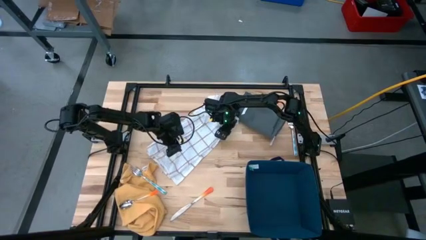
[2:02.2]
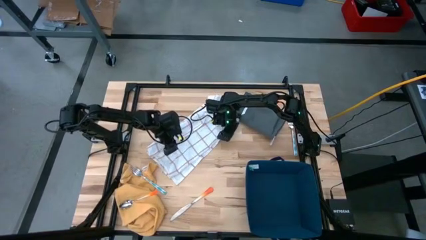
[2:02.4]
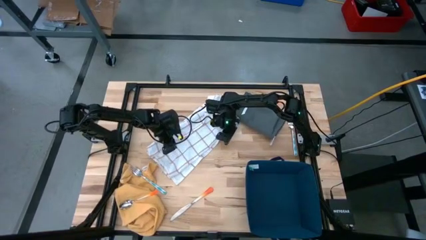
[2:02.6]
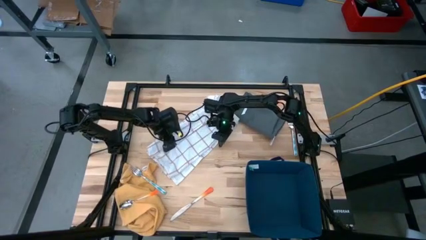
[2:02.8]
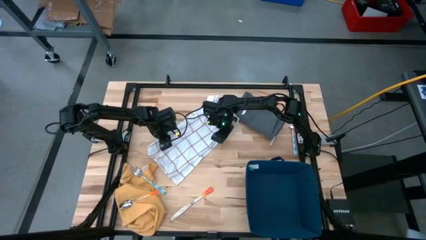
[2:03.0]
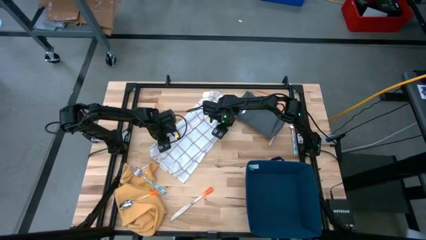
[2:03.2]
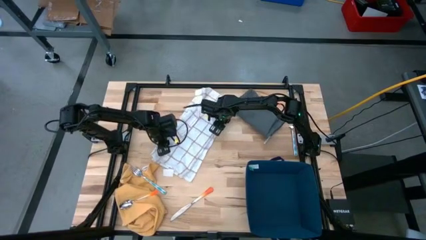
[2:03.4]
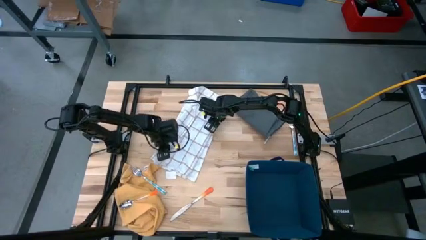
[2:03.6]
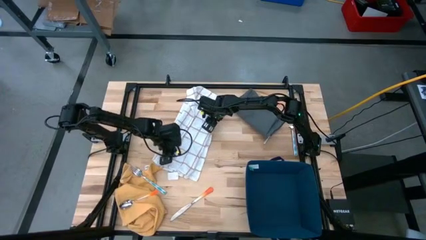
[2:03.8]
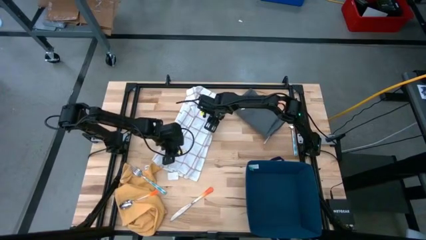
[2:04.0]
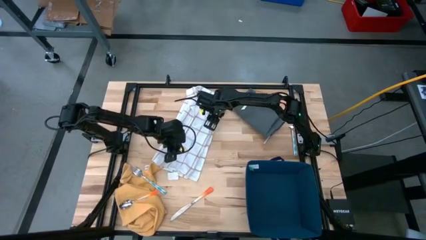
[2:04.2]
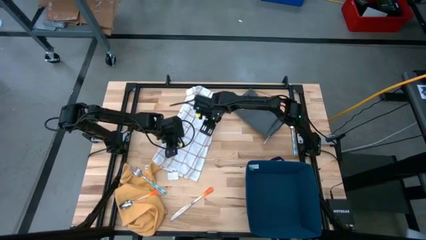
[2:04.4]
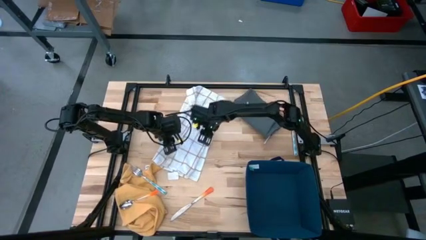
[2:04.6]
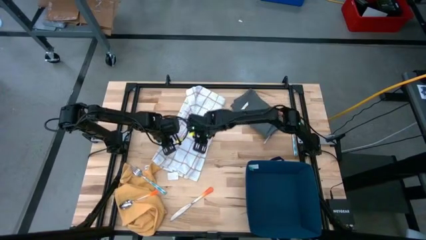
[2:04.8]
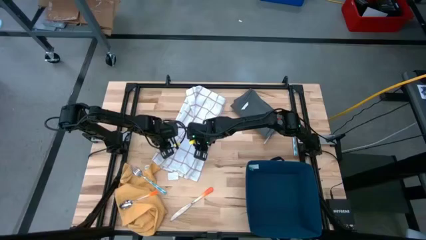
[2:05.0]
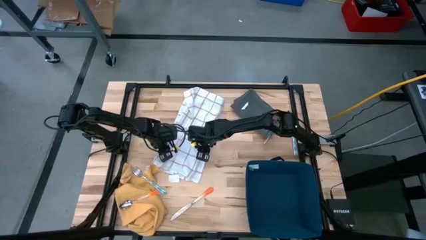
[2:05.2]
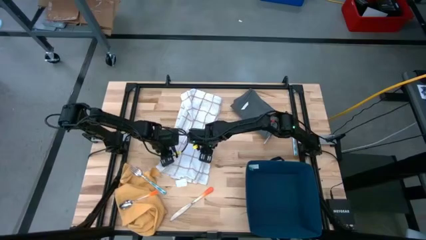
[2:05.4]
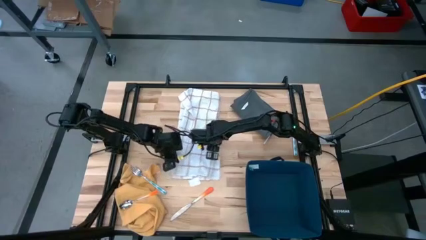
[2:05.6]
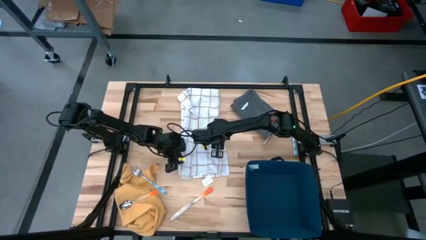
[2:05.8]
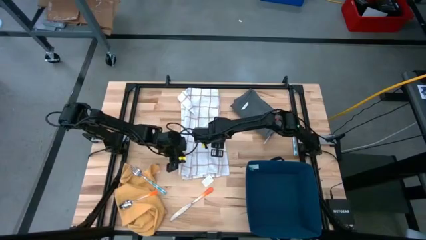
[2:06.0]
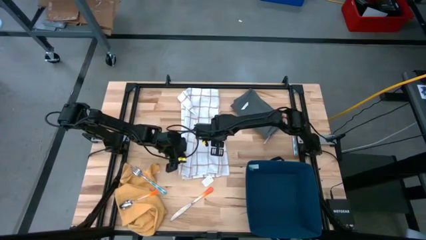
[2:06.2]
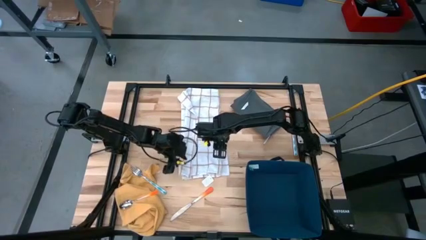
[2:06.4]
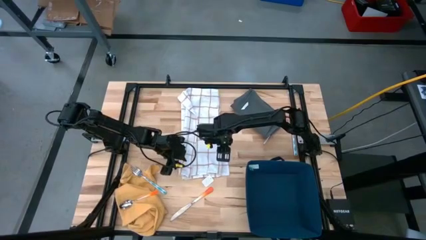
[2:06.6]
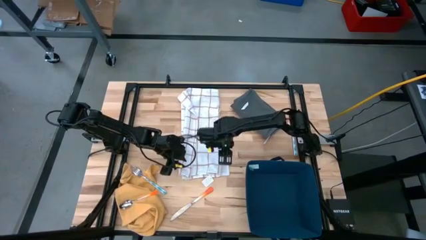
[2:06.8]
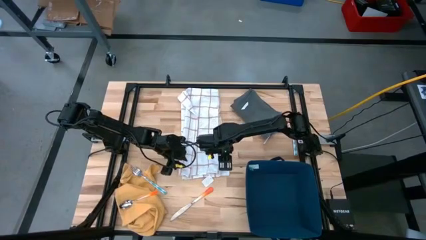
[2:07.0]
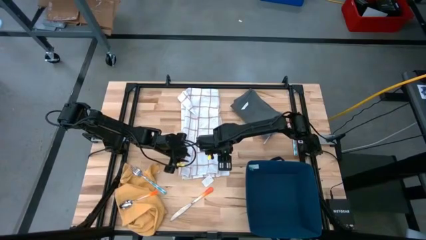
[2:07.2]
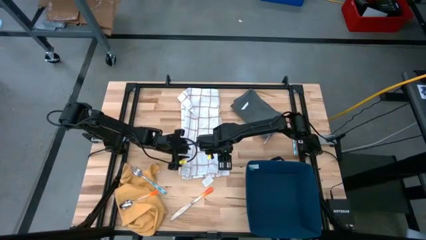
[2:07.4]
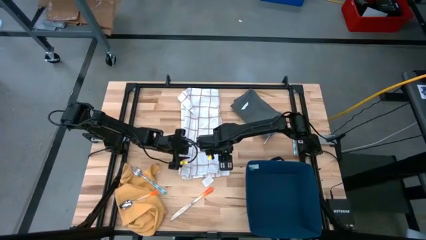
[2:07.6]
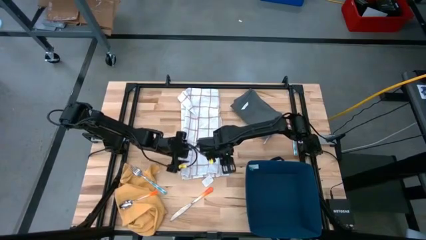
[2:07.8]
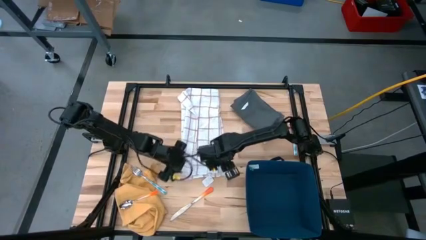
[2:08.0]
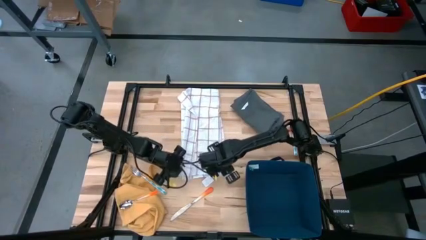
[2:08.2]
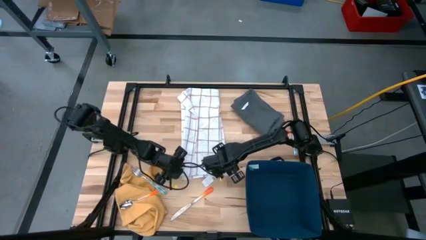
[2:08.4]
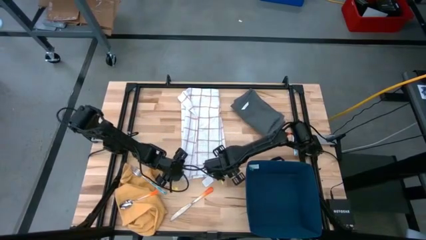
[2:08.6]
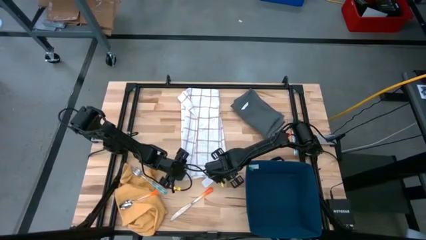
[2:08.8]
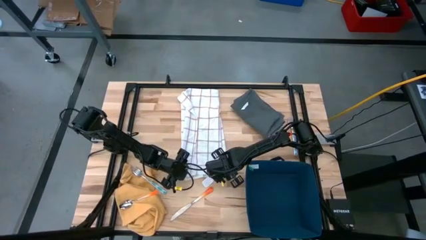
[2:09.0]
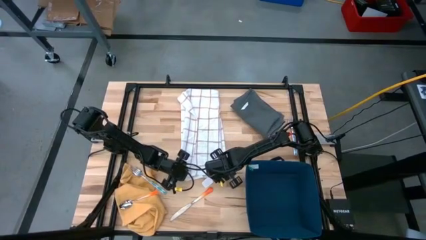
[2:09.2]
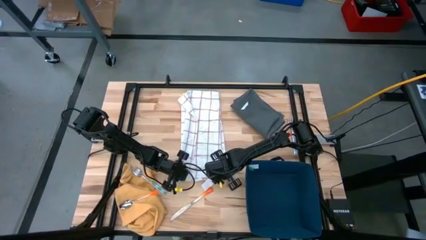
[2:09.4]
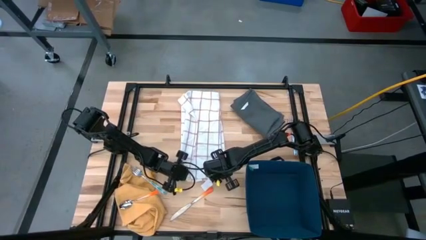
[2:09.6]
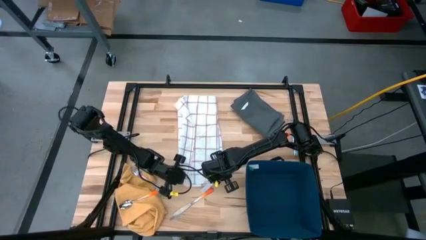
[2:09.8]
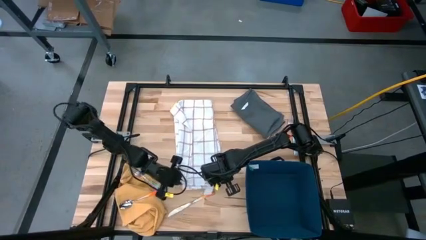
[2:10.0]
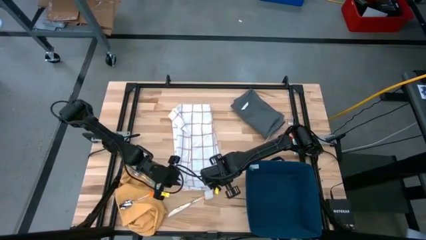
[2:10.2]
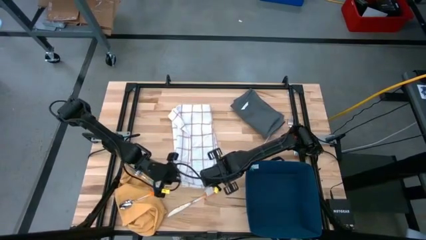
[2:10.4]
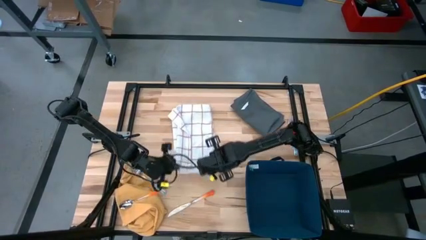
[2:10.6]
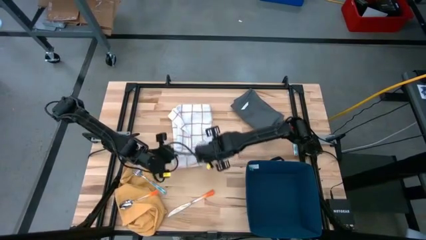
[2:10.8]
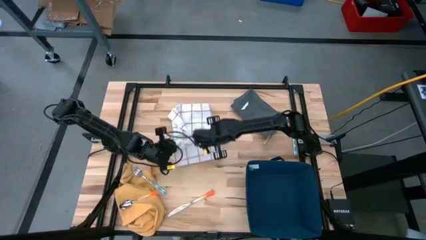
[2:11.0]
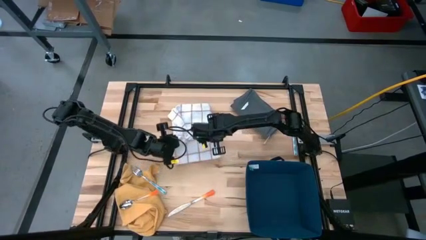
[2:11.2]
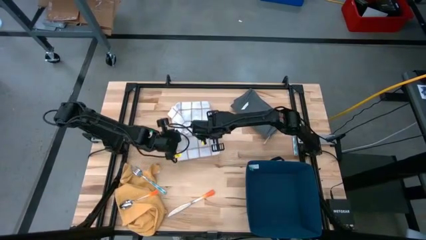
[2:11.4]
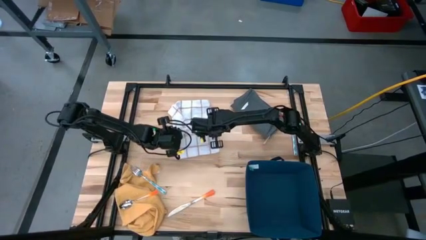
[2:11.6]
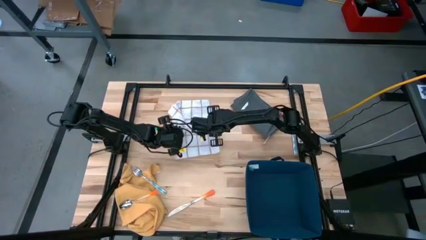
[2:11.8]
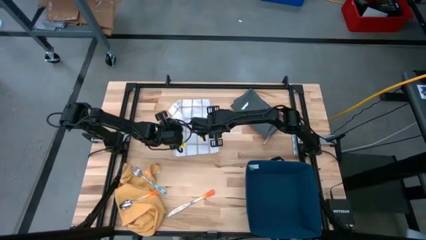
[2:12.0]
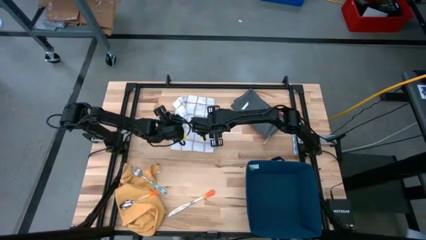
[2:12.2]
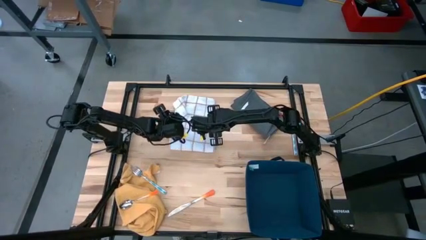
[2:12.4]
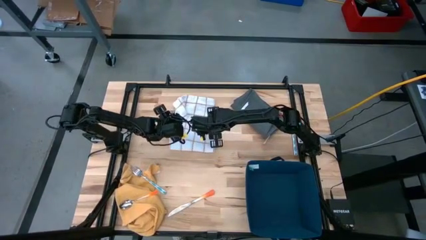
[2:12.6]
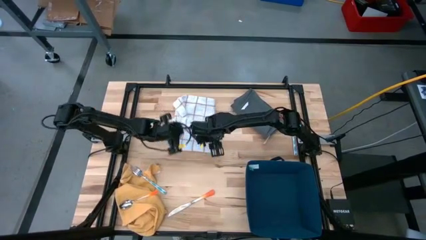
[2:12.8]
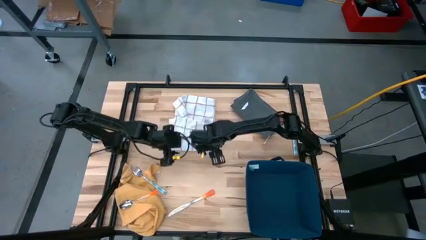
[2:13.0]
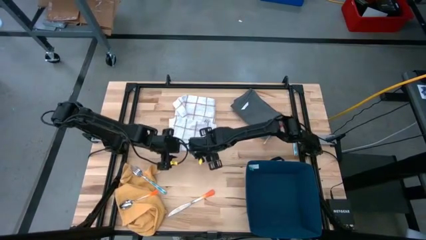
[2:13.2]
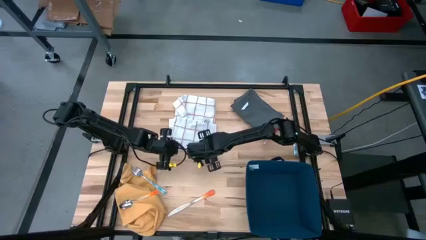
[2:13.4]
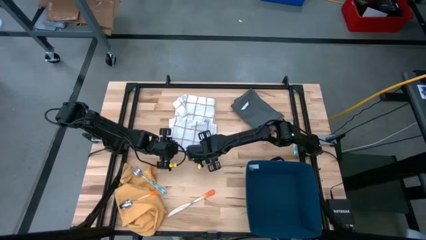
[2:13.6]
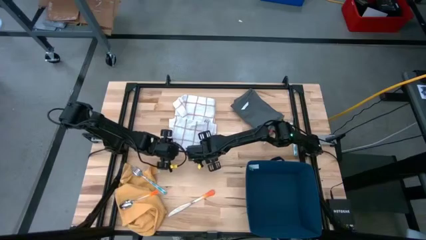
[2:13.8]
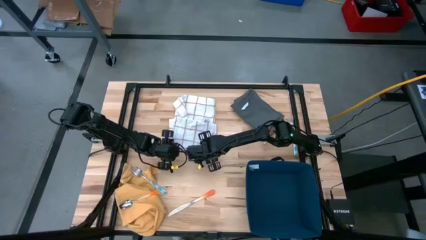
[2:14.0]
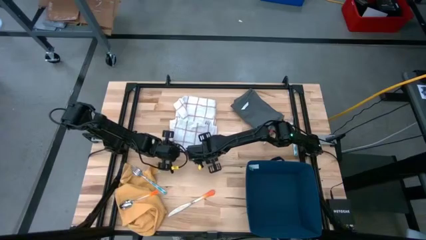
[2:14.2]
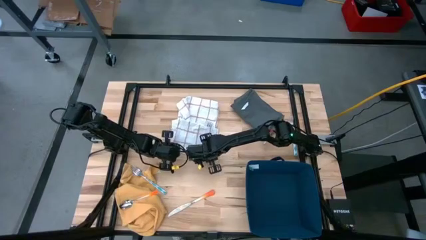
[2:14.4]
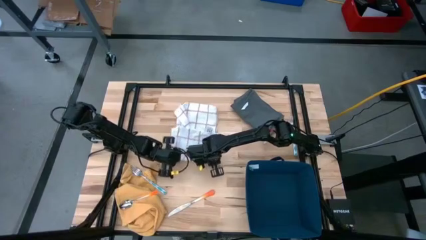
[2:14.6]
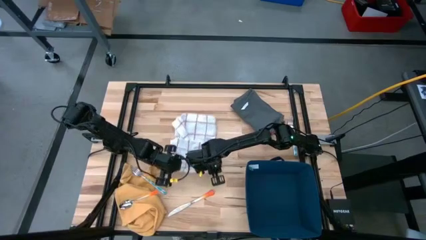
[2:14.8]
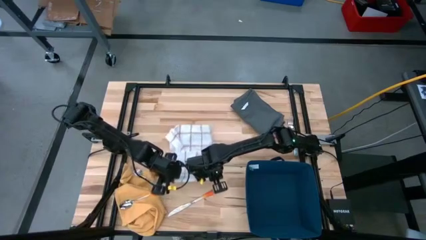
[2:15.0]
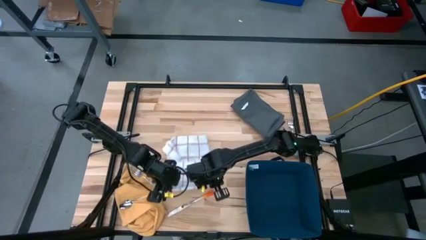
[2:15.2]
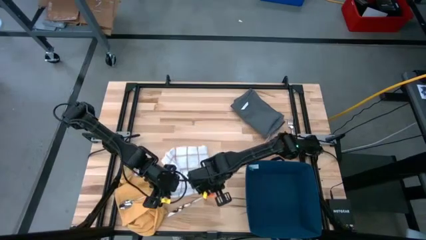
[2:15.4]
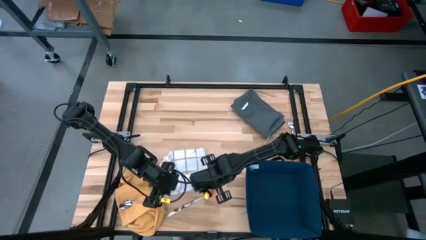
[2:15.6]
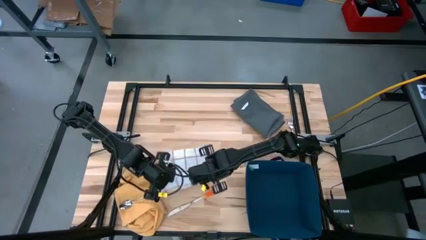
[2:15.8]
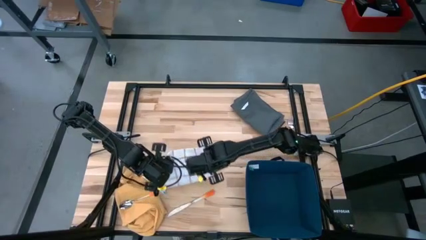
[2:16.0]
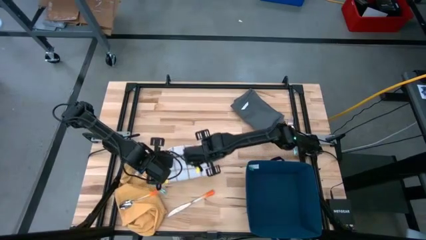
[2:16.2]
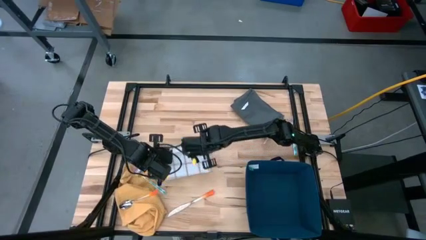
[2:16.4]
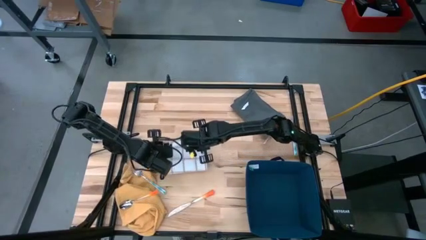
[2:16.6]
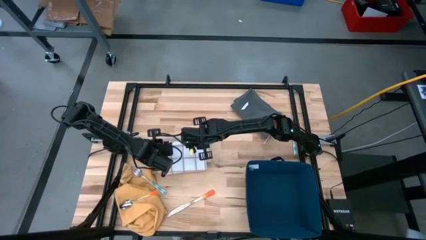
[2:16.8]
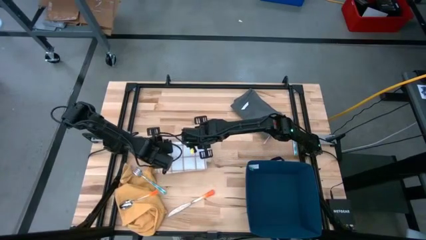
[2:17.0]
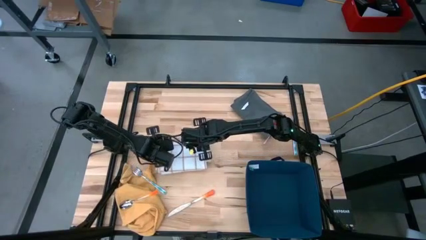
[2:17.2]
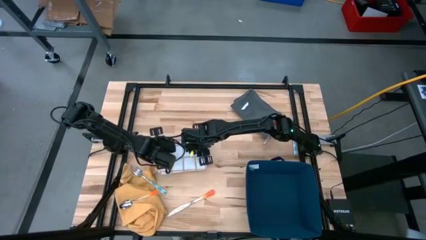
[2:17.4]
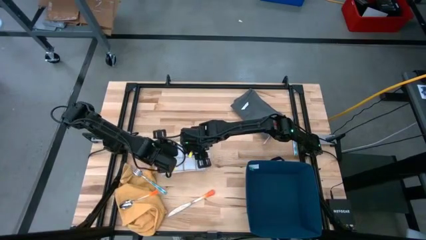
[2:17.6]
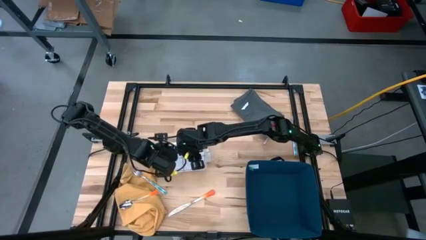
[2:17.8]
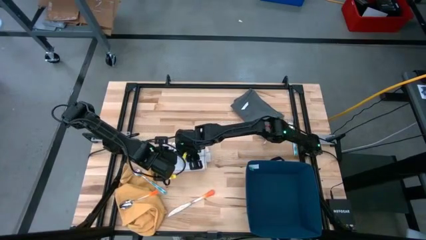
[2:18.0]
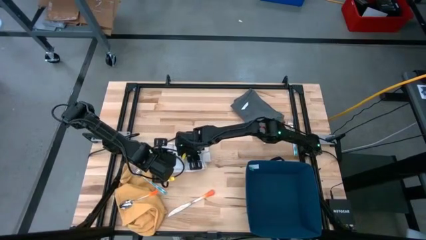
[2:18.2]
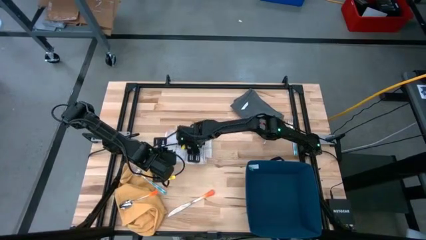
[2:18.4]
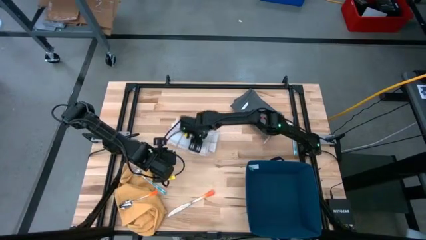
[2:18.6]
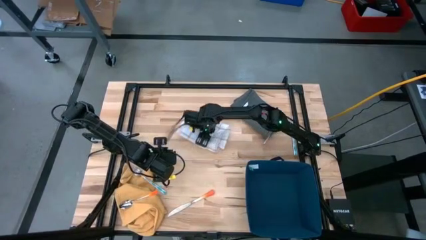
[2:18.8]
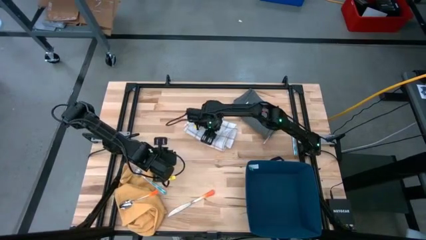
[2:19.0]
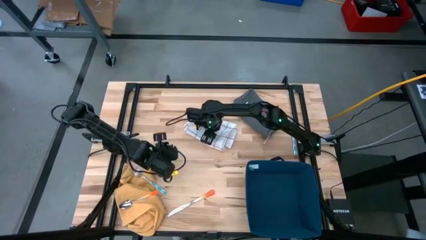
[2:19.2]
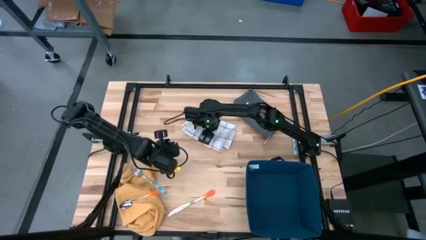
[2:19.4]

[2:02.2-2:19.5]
Task: Fold towel
Fold the white towel
